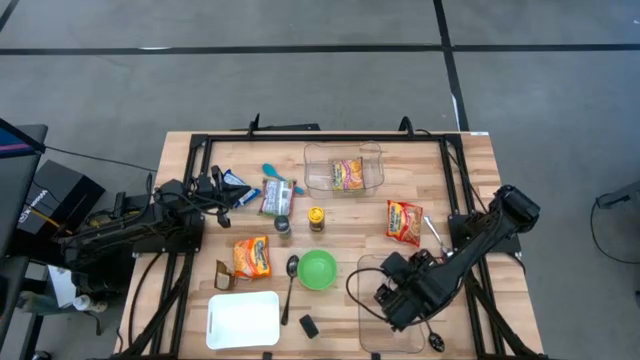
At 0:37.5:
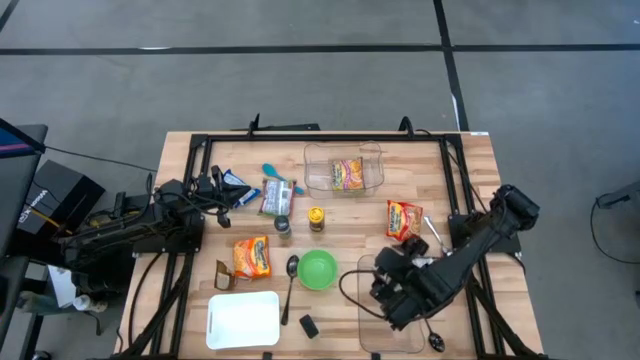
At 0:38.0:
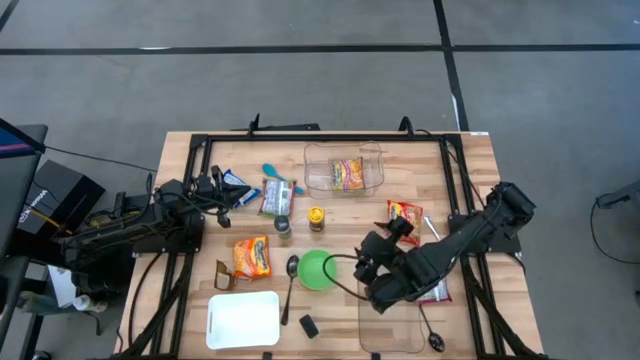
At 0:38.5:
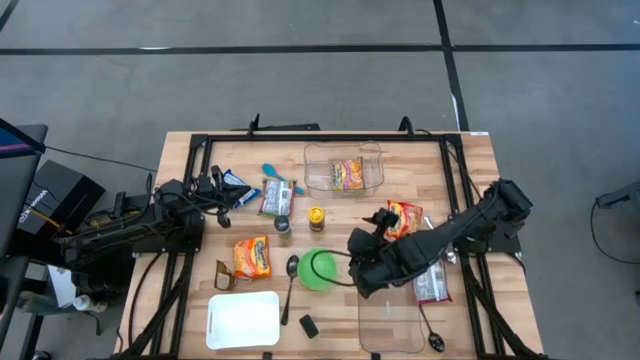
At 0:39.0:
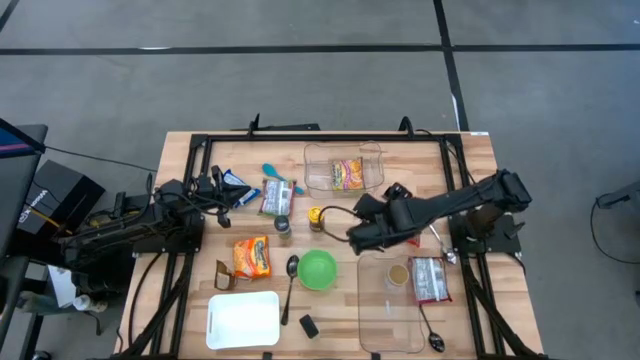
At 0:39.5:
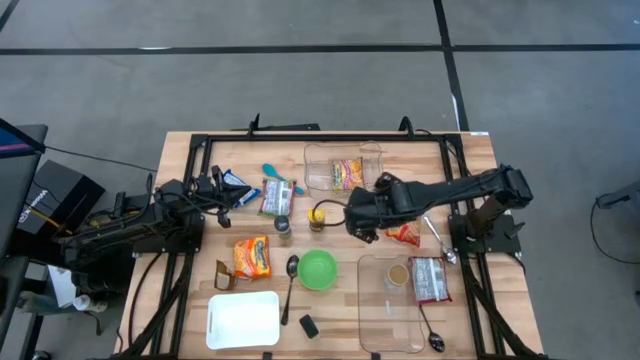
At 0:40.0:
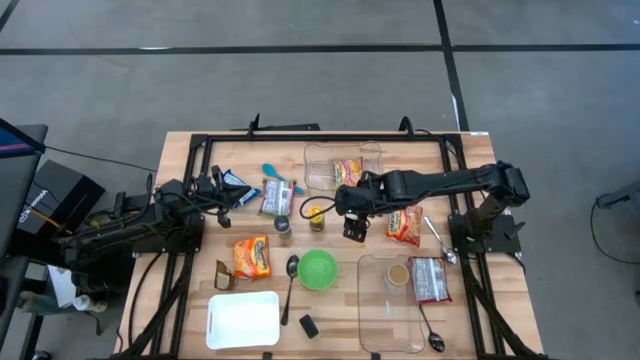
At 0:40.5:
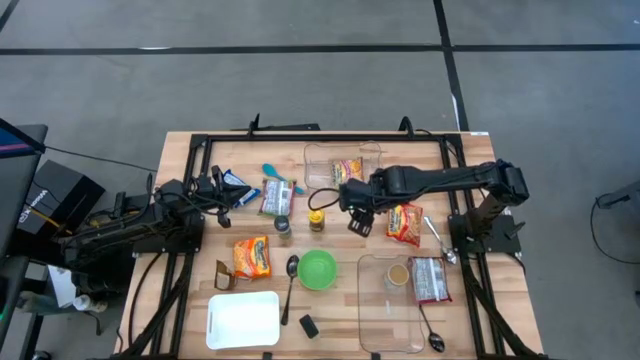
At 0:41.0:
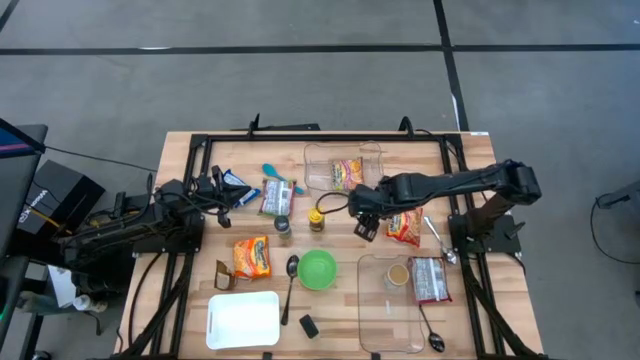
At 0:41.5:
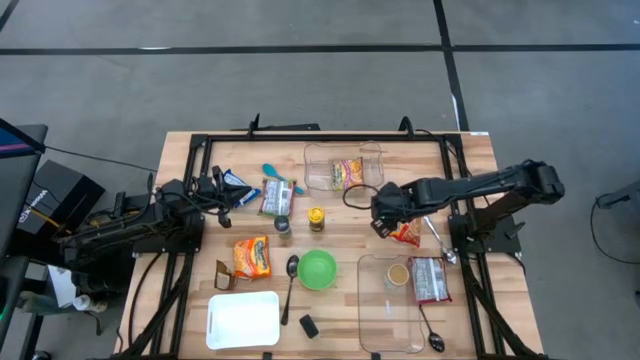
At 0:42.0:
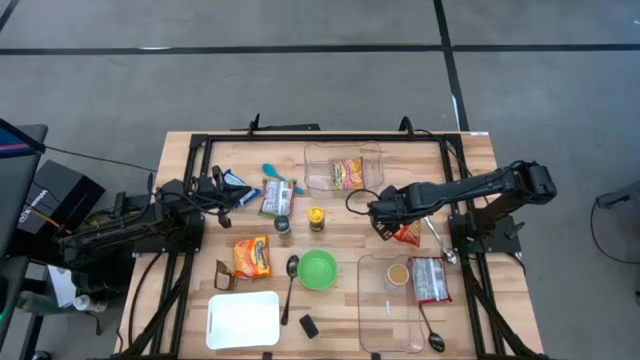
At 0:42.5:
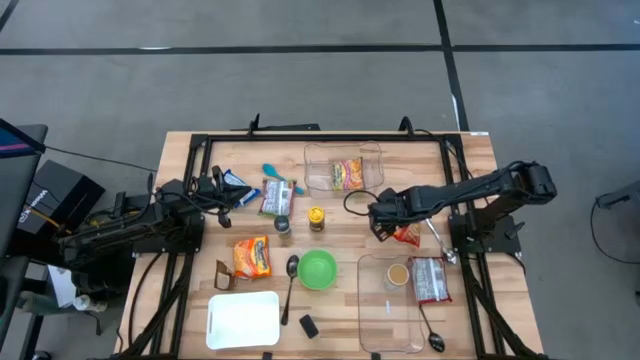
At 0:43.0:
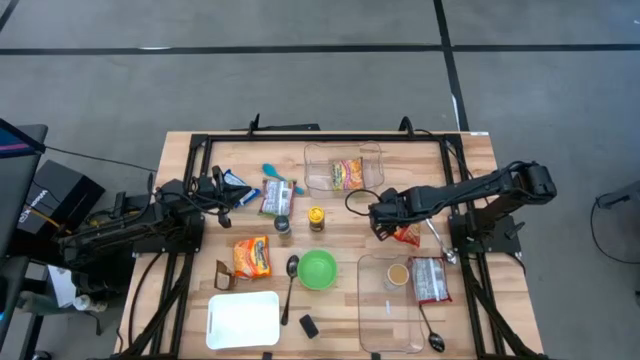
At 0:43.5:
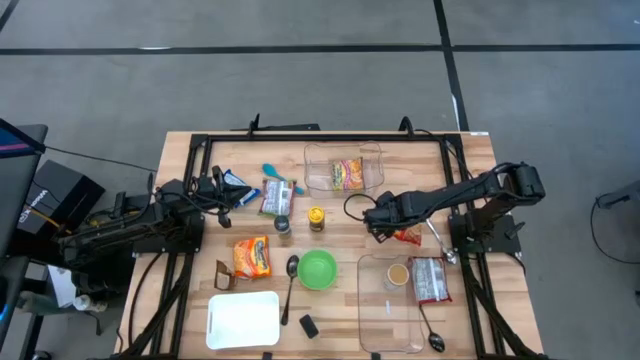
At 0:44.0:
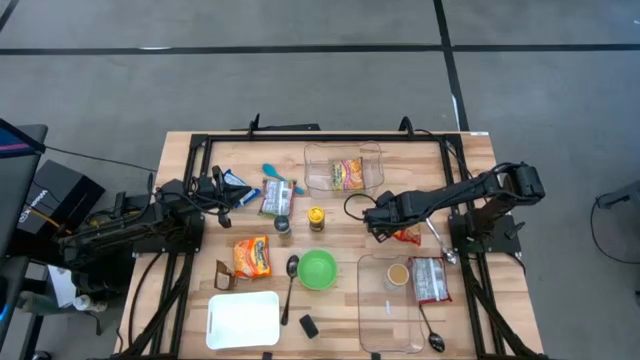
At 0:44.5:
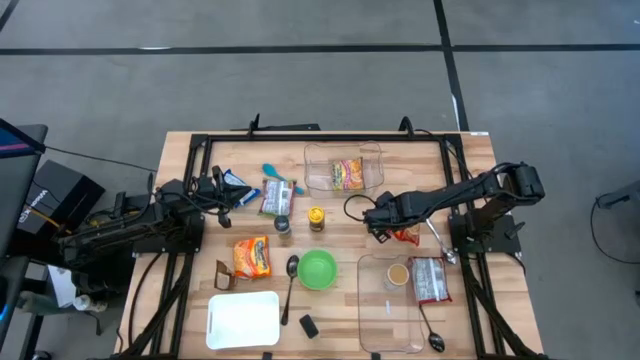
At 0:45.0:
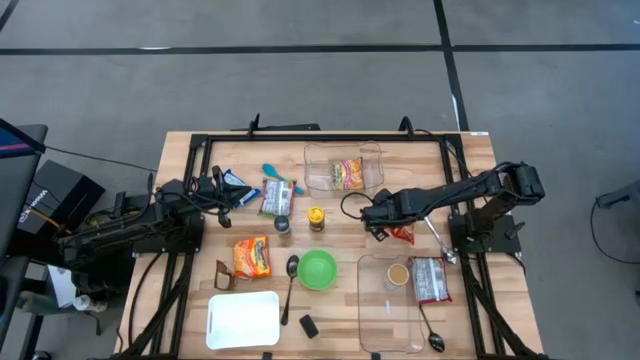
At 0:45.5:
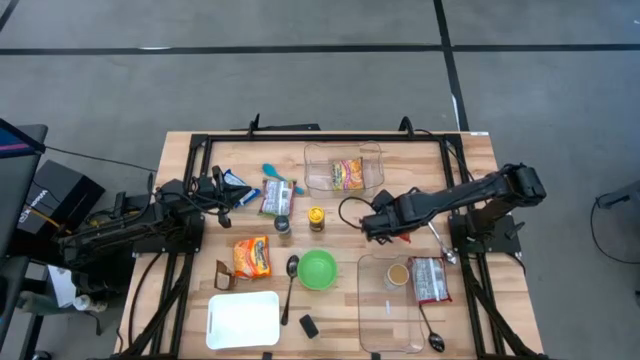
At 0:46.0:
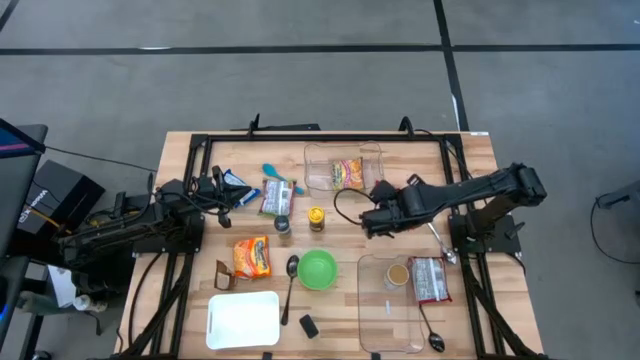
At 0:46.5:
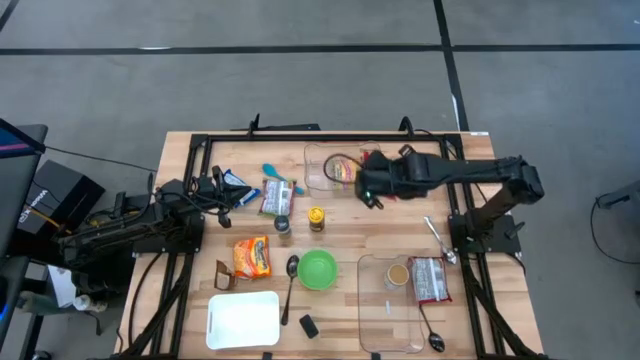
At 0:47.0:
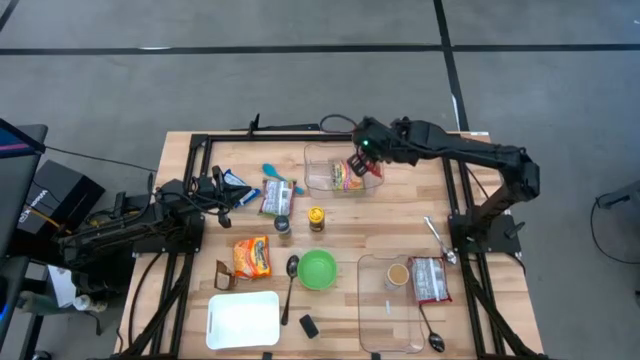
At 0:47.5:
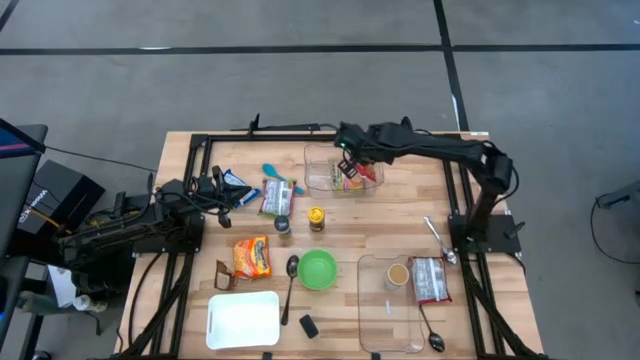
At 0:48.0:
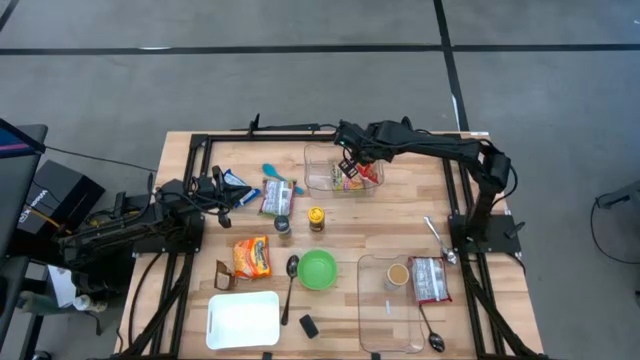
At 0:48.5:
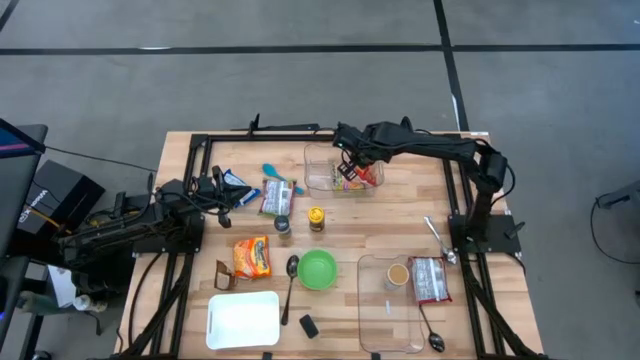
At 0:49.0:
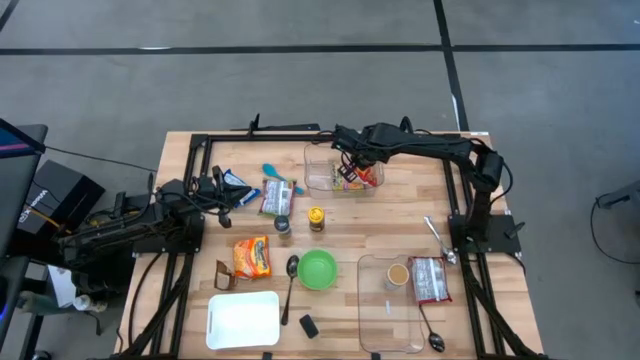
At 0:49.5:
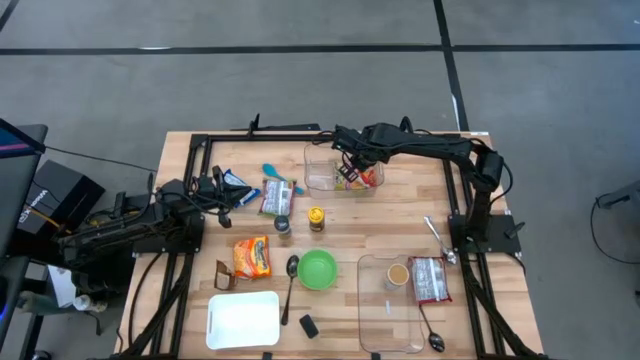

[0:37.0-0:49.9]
Task: Pick & Place Food Item
Put the top red noodle pack into the top transparent bin

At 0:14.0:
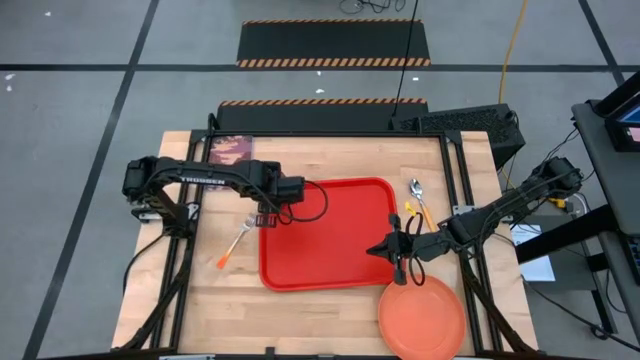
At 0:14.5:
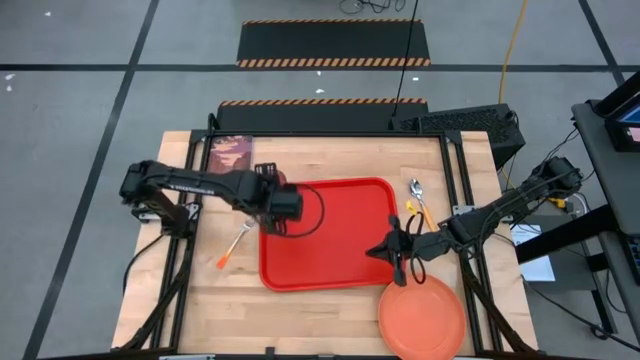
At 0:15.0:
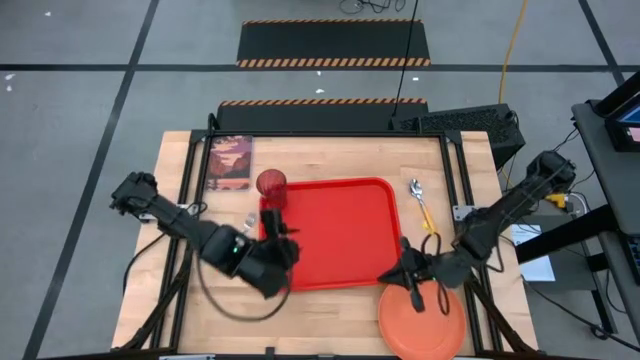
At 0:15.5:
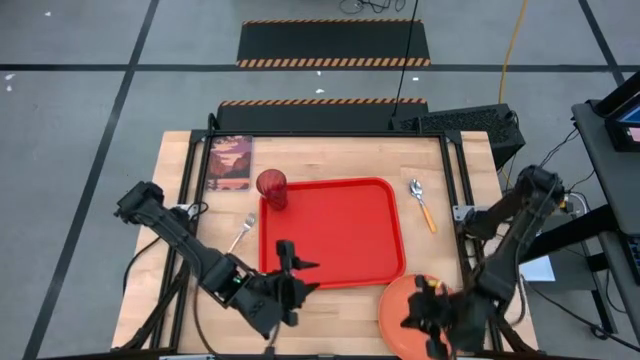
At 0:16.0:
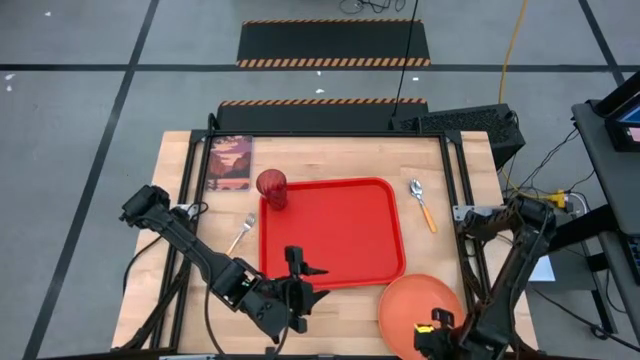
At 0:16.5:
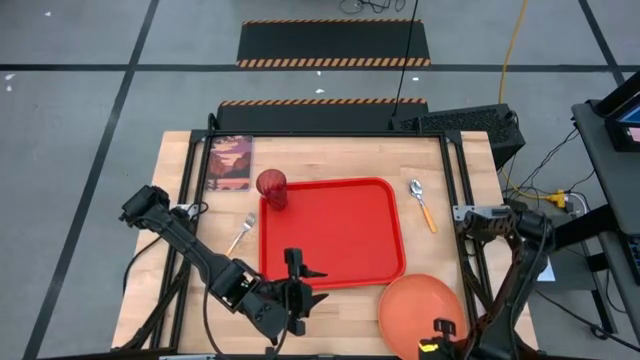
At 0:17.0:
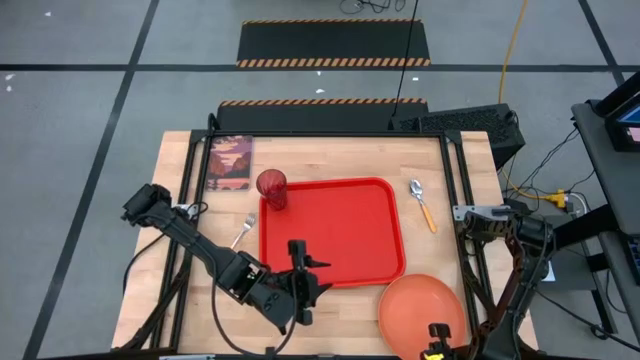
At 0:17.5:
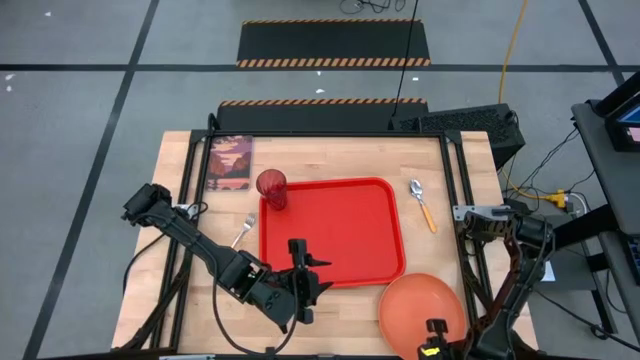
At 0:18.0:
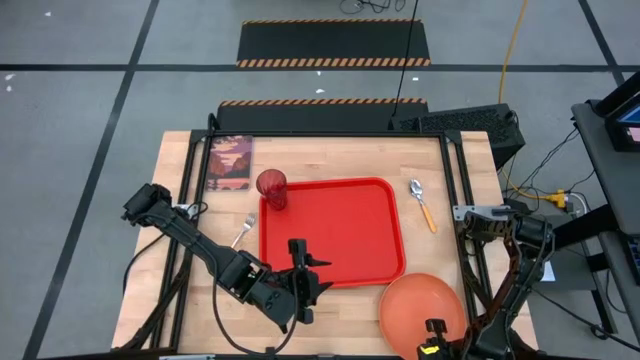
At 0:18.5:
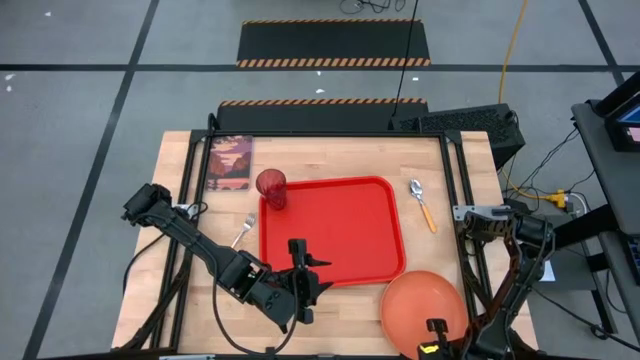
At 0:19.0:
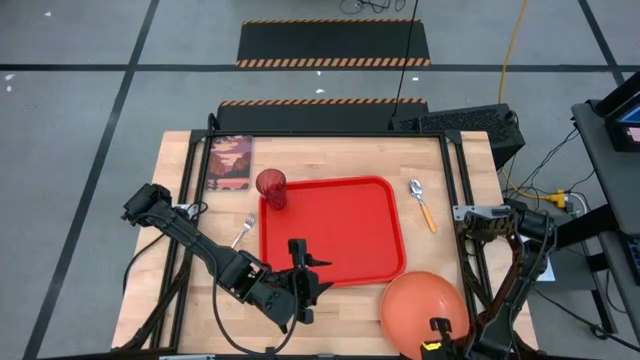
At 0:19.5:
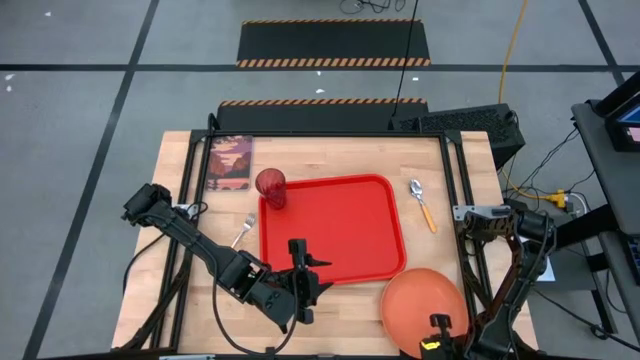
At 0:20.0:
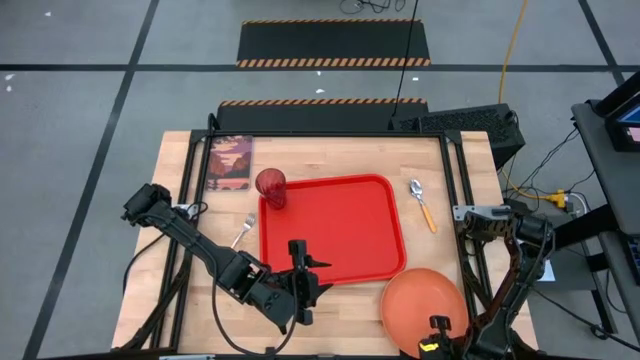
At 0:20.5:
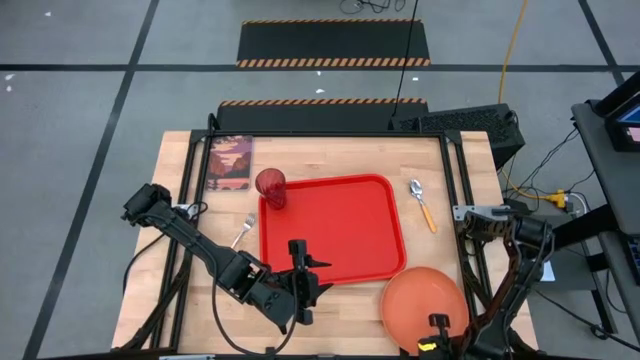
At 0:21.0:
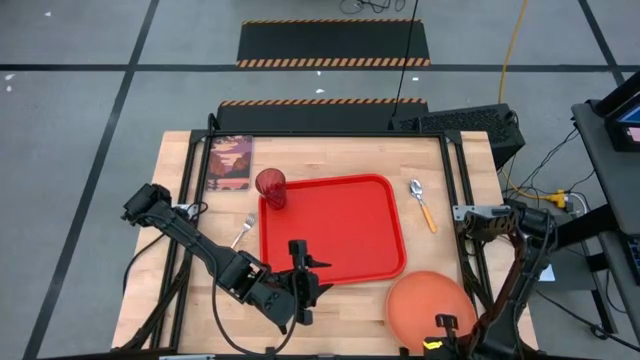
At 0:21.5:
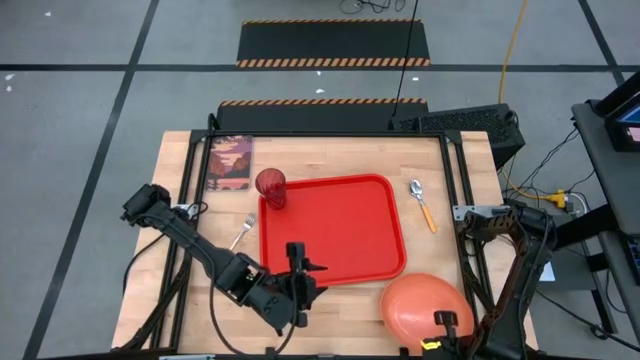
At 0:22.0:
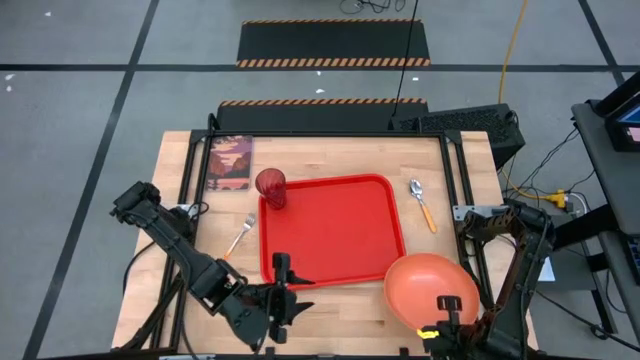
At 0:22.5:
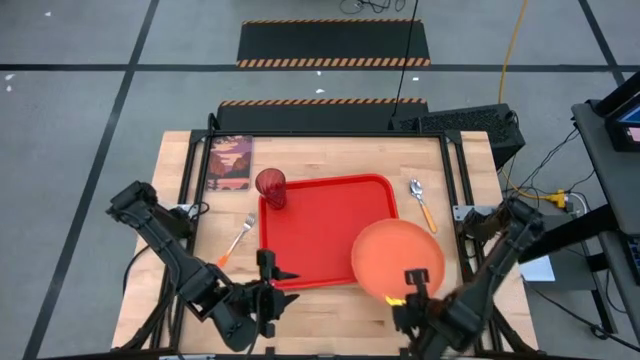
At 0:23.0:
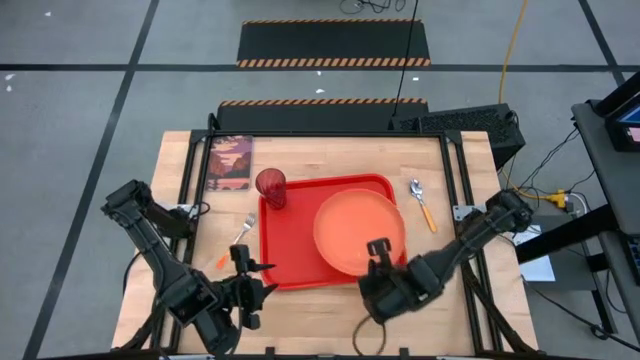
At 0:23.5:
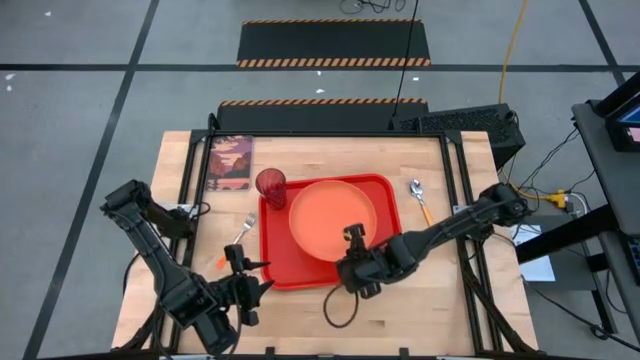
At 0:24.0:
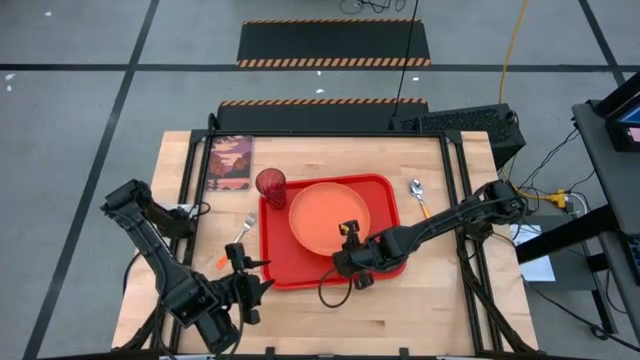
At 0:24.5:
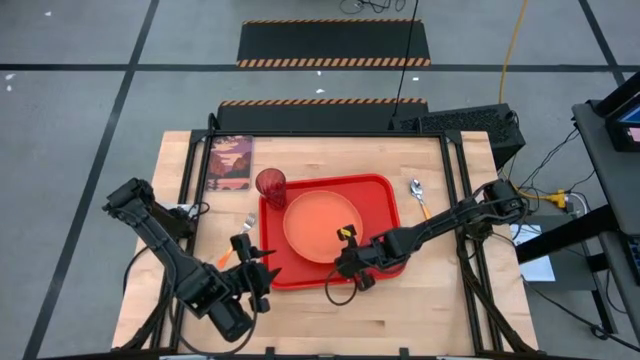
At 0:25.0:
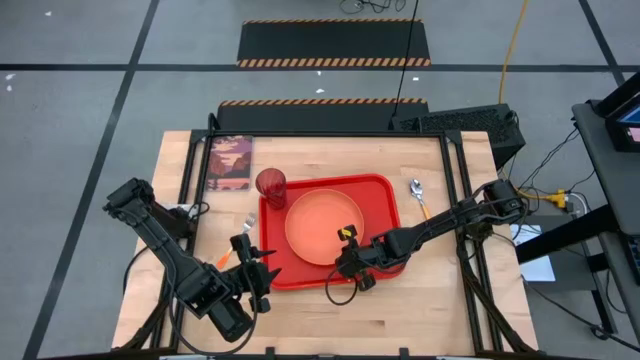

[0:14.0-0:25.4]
Task: Pick and place plate/cup/fork/spoon on tray
Put the orange plate on the bottom right of the red cup
